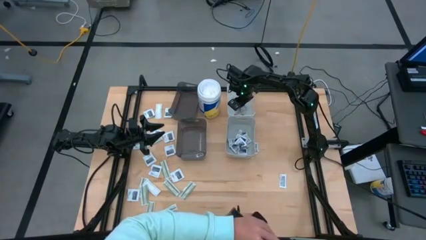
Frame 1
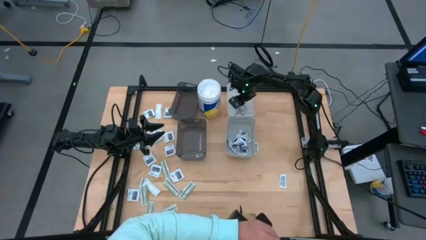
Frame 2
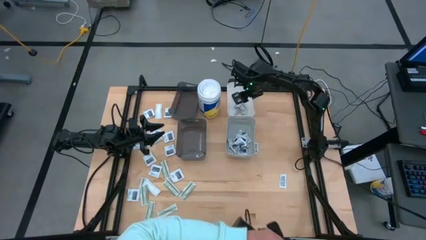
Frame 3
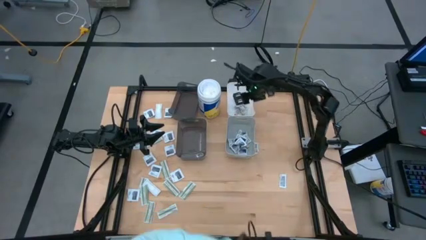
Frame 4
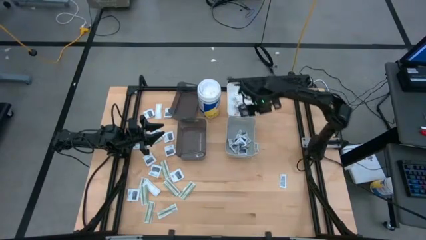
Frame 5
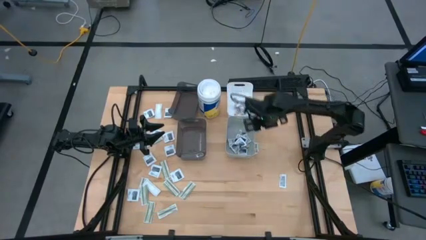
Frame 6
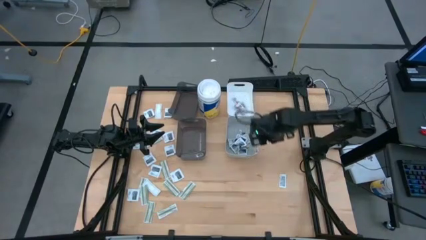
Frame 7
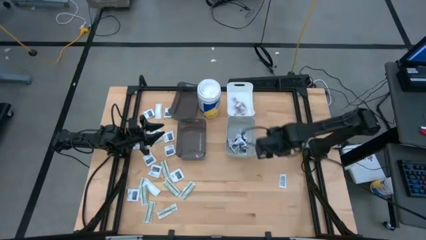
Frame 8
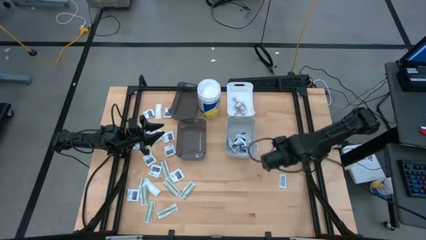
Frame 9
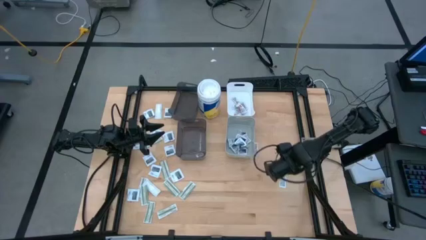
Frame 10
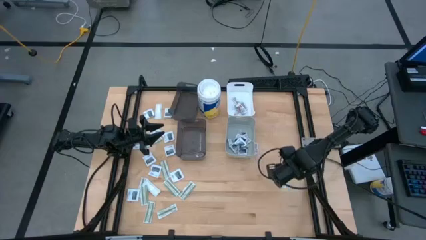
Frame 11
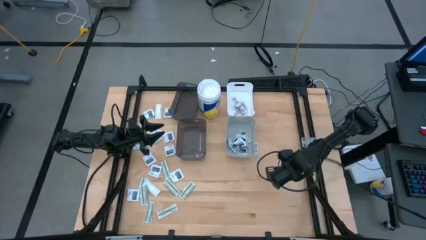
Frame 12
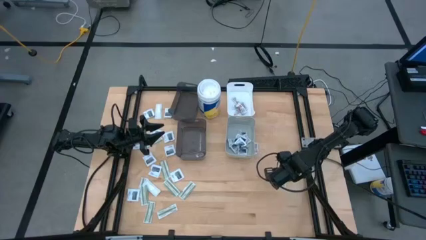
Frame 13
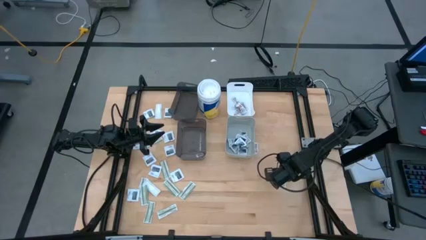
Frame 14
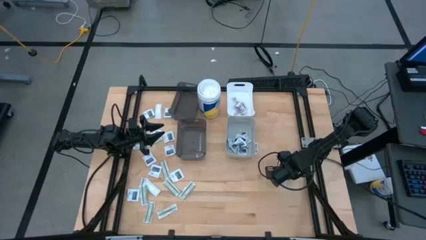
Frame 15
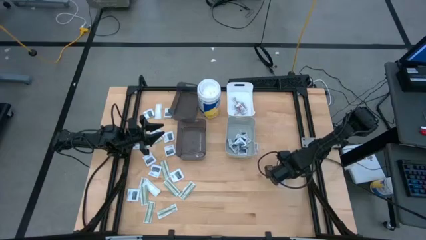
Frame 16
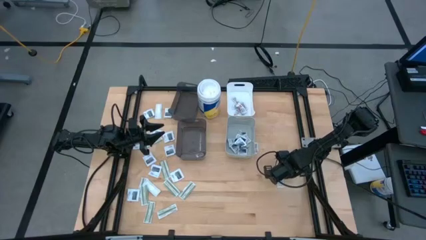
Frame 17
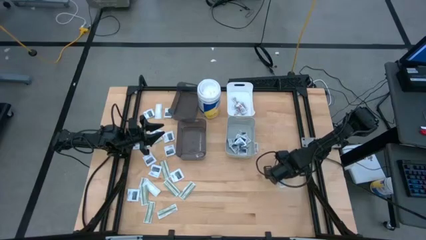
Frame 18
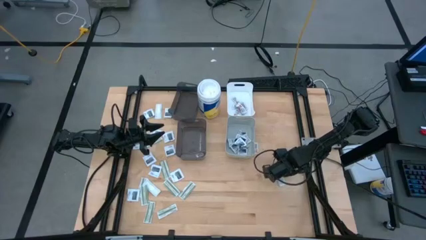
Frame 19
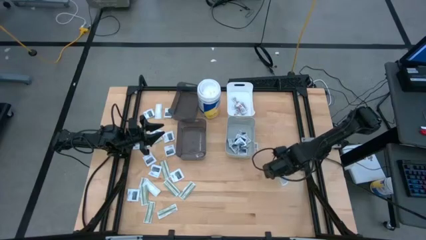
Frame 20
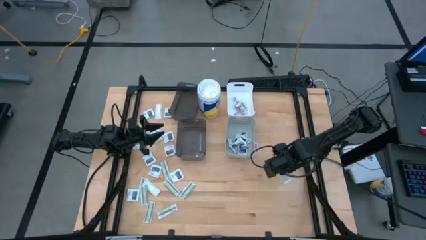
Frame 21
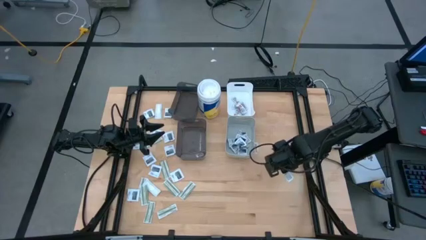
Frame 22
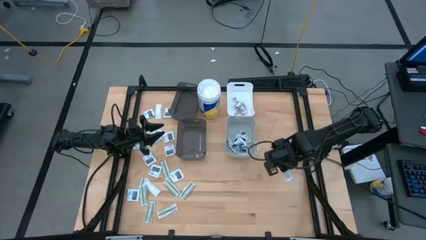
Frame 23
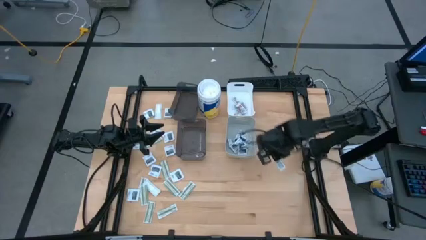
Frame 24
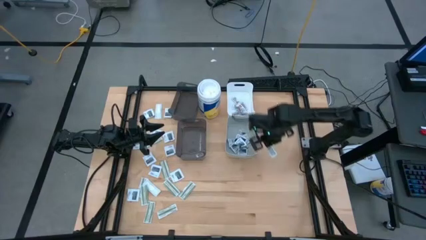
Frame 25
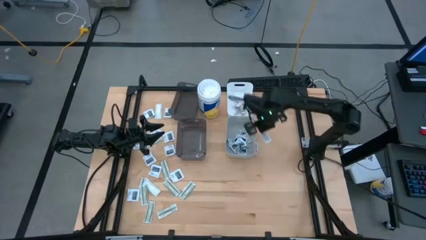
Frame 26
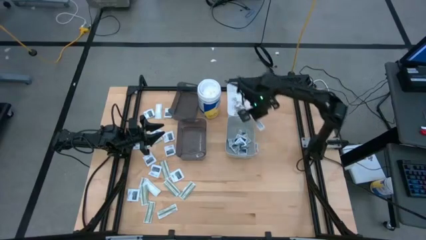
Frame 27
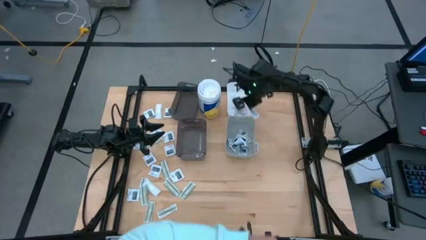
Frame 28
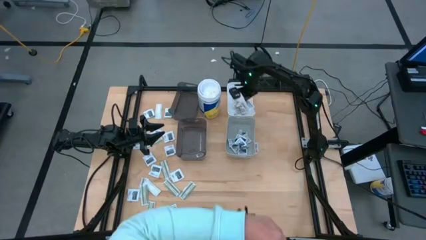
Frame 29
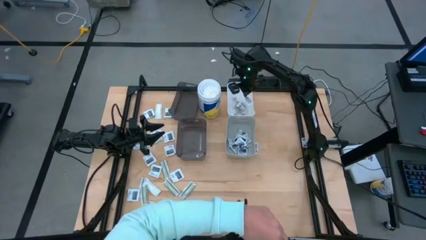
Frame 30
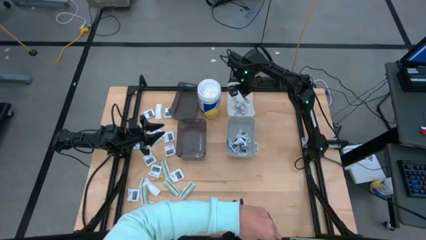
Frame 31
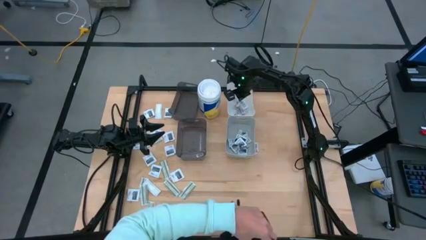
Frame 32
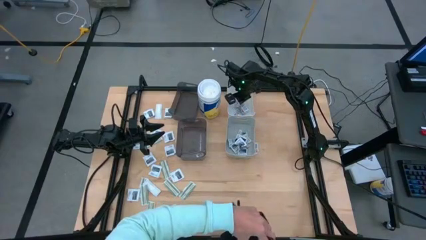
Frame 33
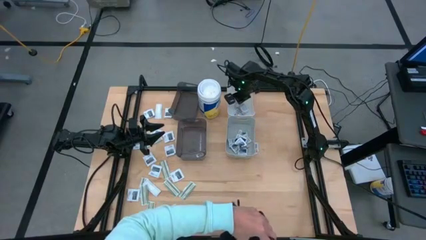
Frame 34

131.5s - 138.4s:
Task: Pick & Place First Aid Supplies
Put the bottom ointment pack into the white bin

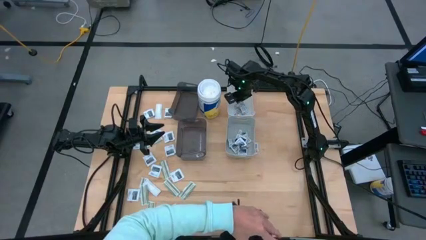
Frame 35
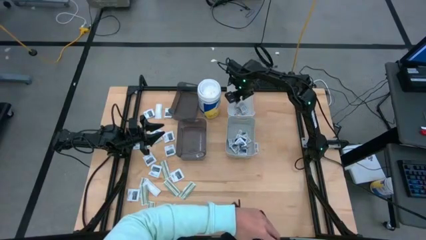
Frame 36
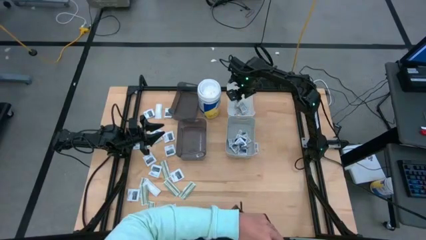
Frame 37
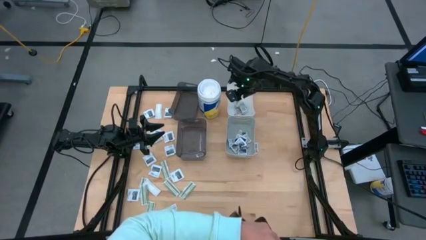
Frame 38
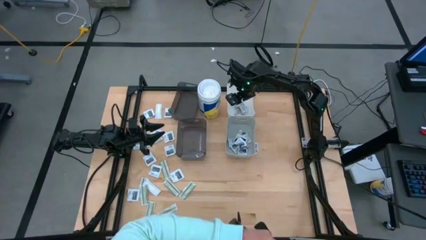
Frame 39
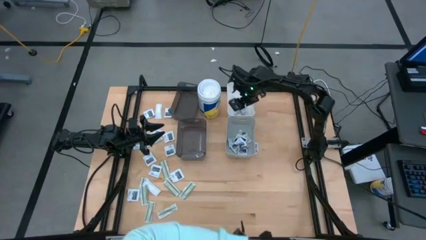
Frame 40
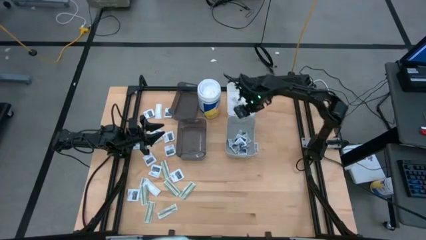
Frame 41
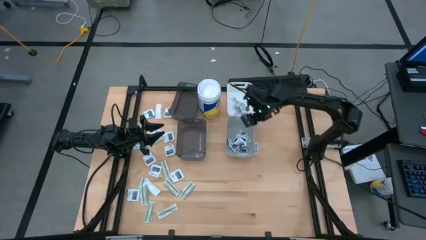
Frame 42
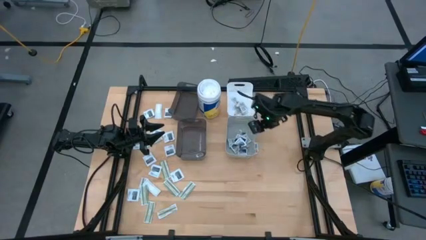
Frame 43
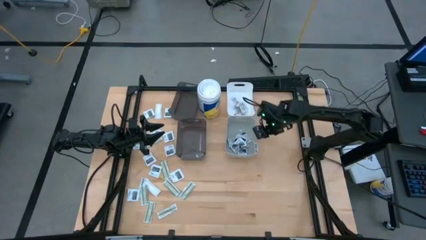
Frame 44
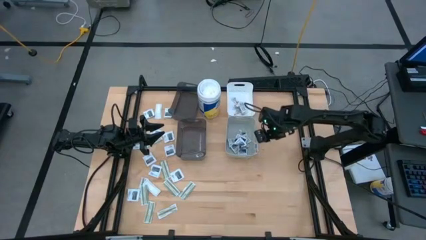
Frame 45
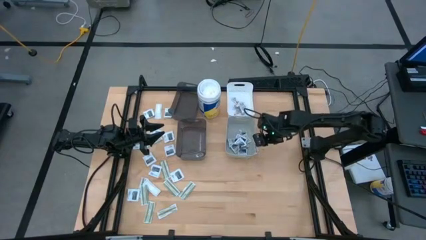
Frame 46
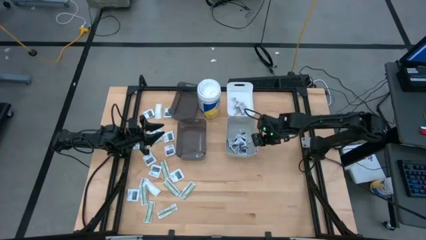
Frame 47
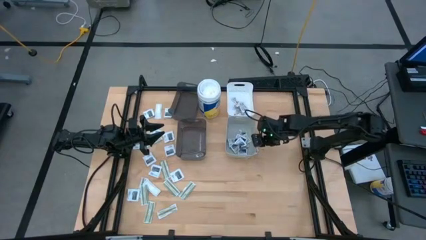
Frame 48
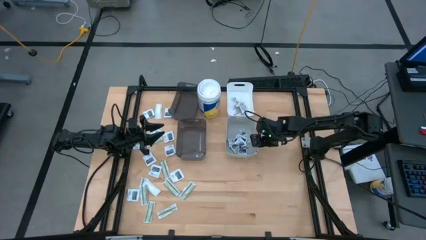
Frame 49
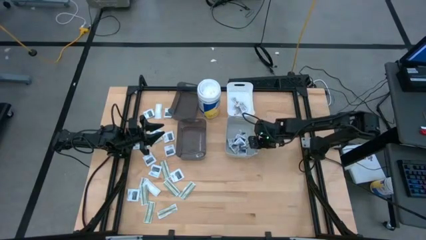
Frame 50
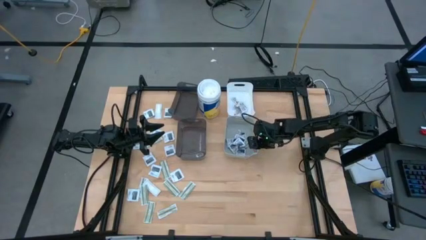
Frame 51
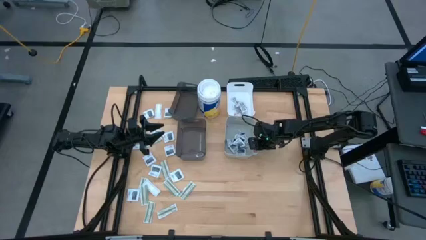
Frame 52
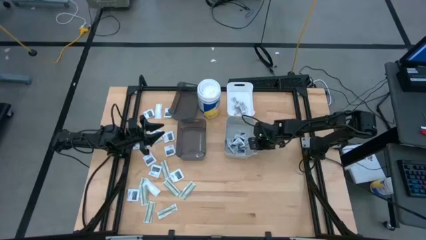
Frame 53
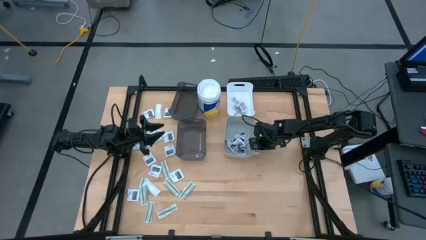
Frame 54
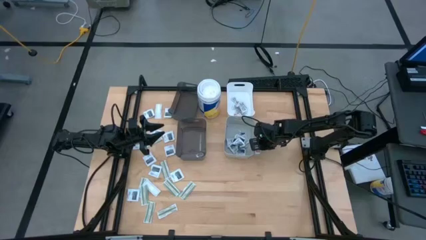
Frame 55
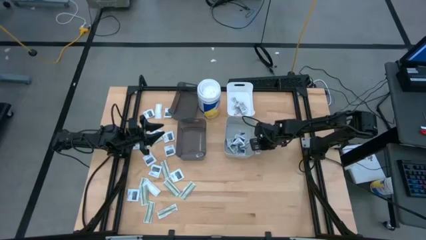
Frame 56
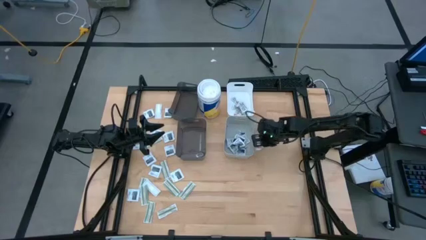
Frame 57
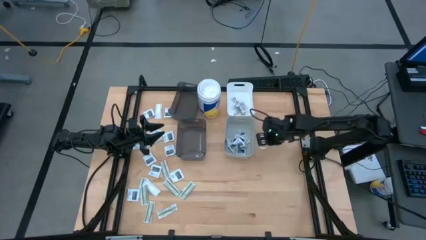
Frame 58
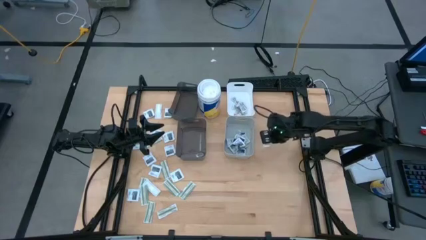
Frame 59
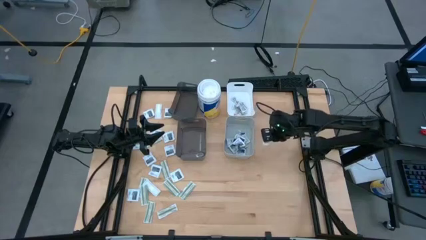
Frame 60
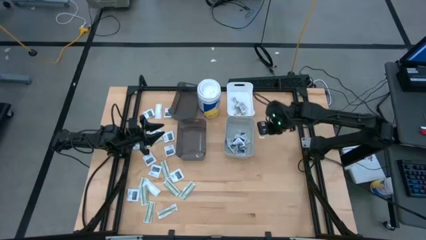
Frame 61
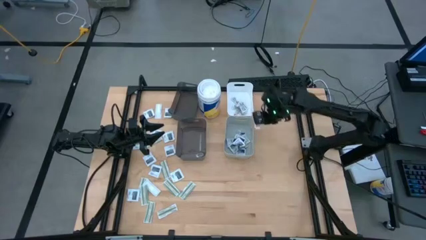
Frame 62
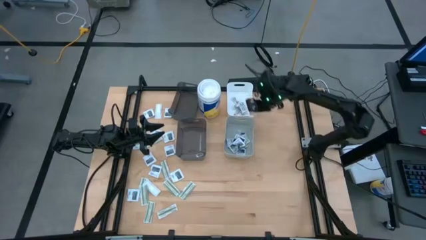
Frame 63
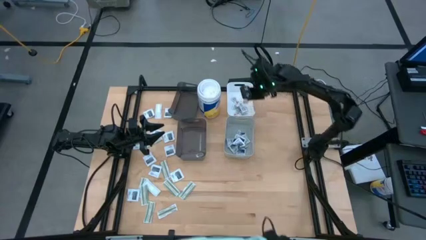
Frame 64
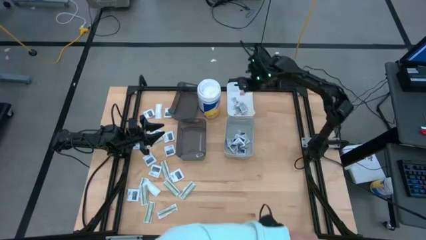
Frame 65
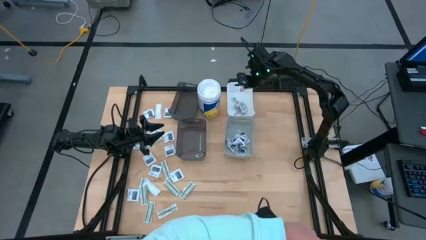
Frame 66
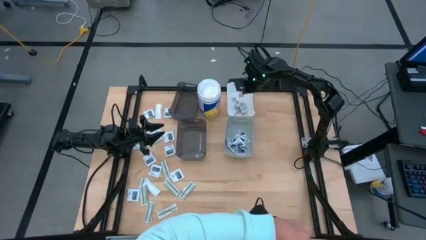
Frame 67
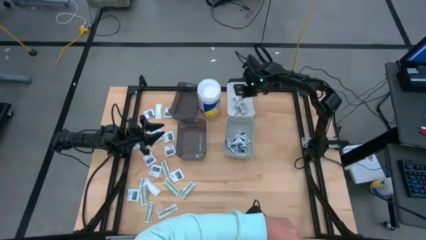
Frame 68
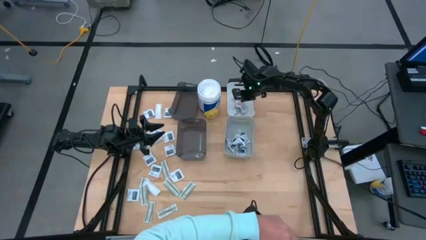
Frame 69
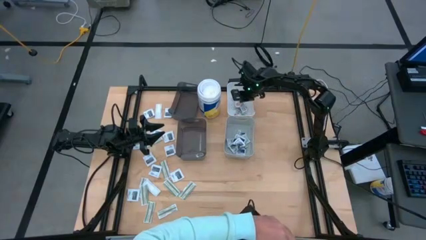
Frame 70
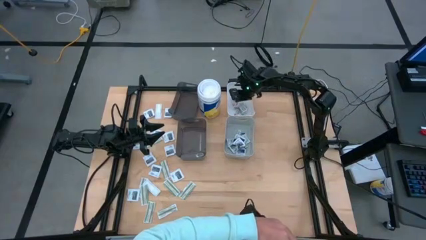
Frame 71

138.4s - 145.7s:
Put the ointment pack into the white bin

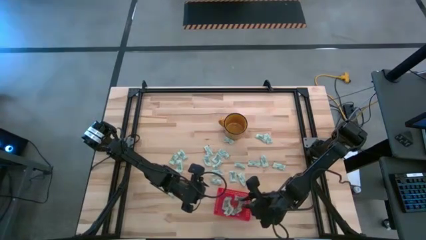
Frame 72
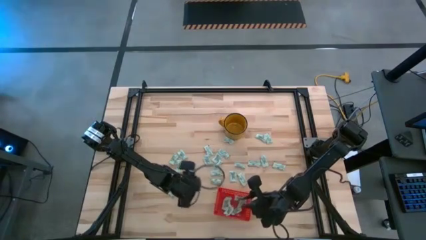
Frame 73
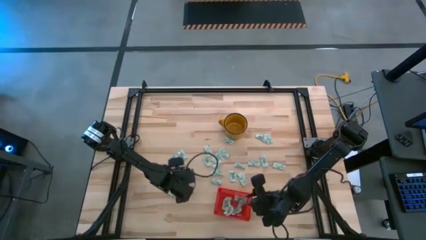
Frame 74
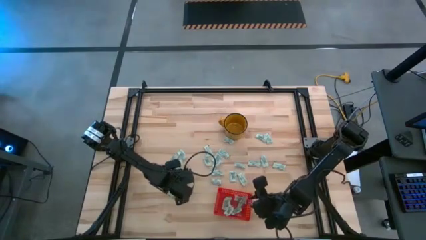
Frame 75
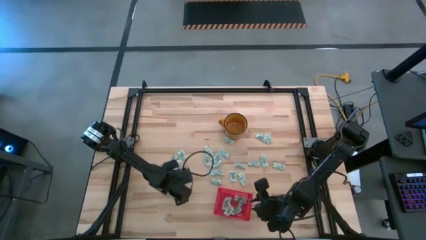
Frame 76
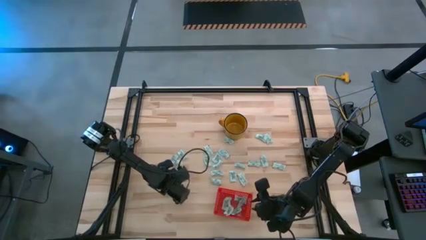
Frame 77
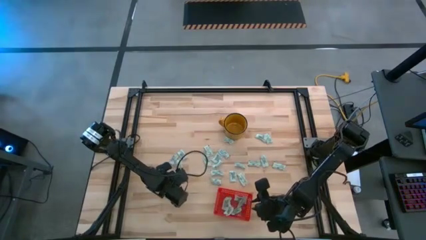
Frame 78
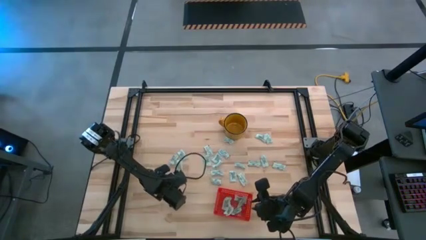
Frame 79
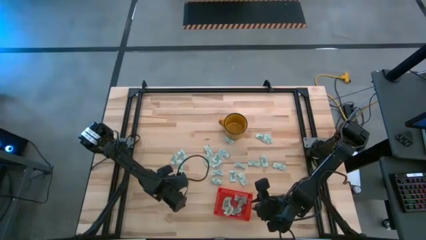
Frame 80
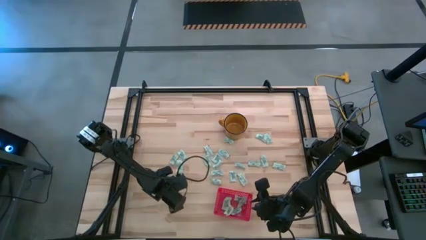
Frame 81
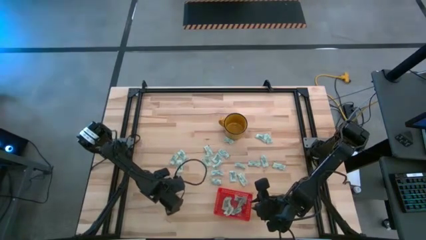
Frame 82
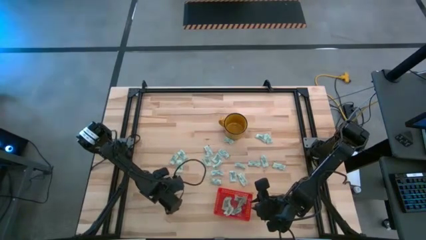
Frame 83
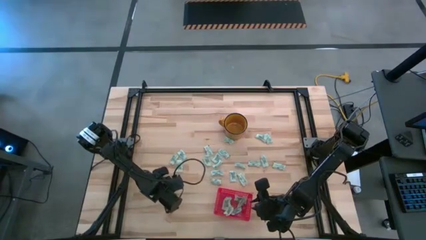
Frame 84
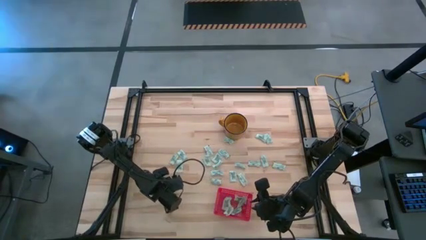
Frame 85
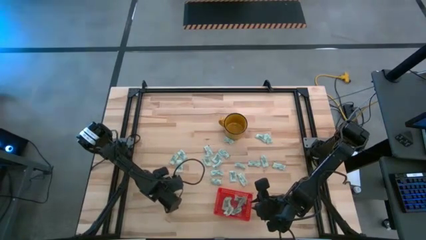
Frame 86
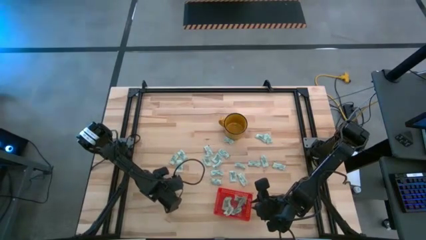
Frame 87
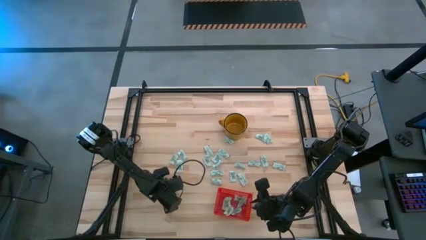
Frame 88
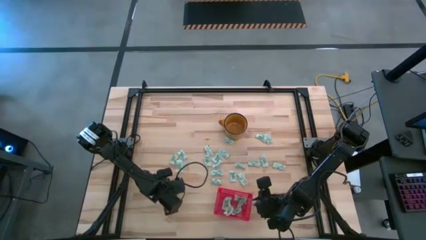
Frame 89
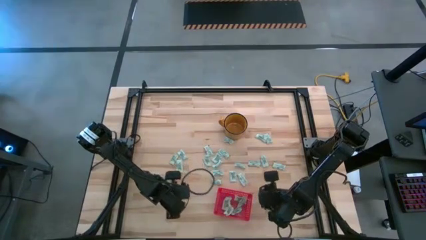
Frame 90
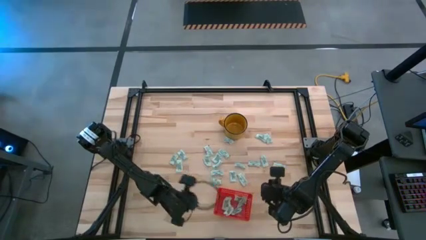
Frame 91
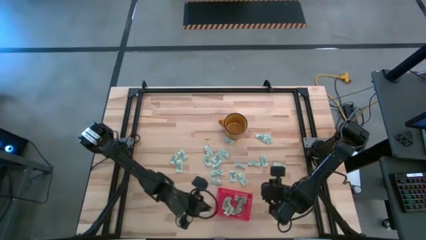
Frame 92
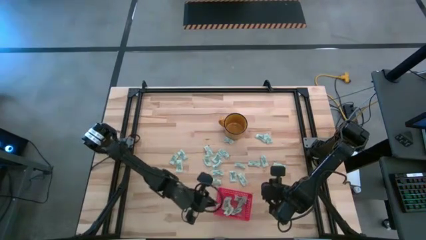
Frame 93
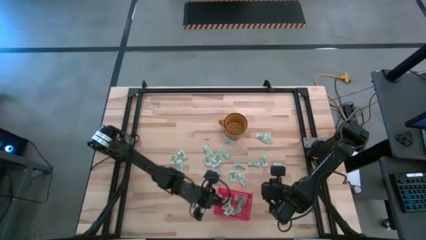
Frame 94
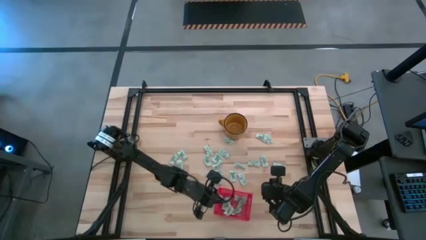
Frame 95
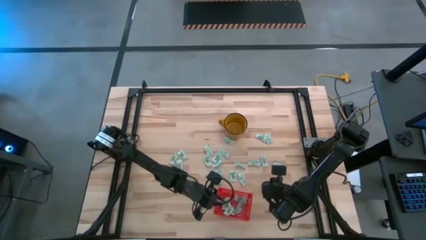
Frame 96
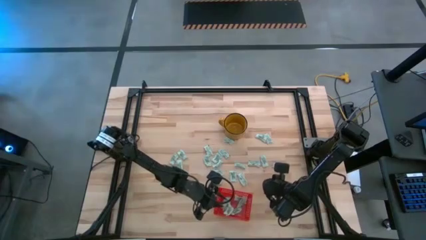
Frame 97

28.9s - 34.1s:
Task: Pick and place Stevia / Truvia into bins
Put the stevia packet into the bin
